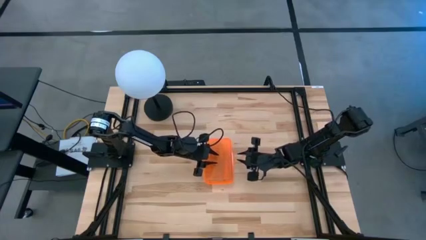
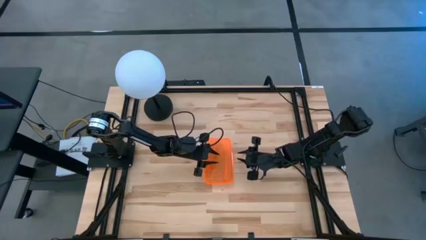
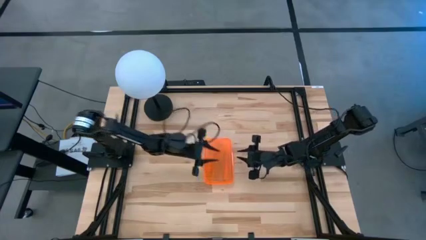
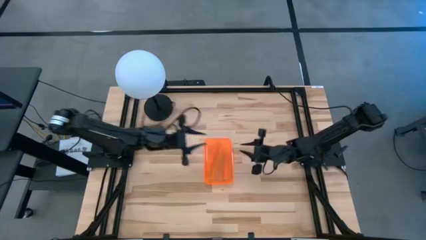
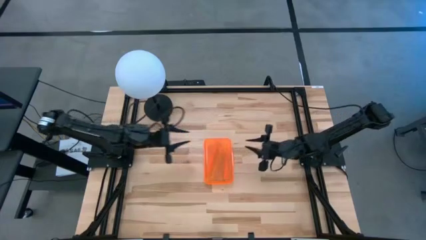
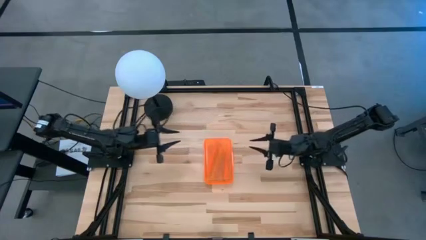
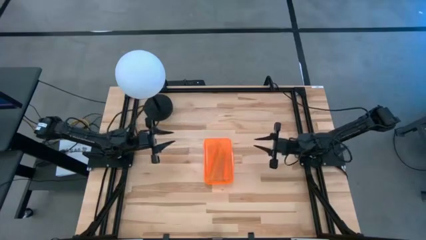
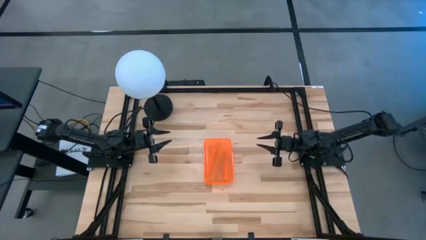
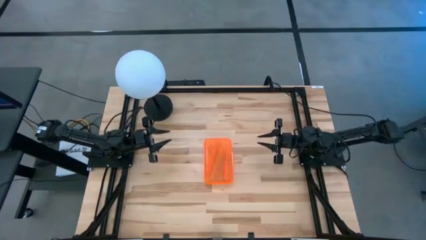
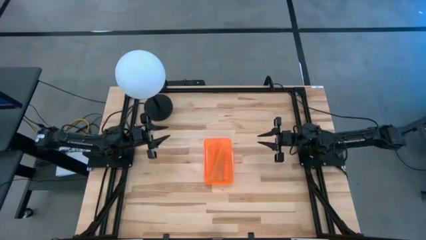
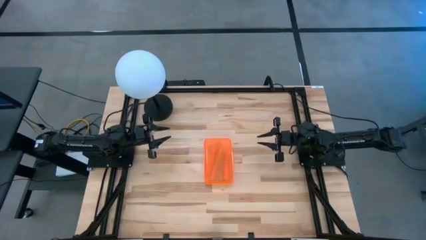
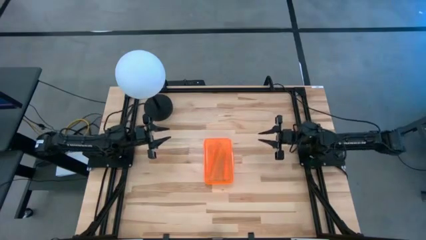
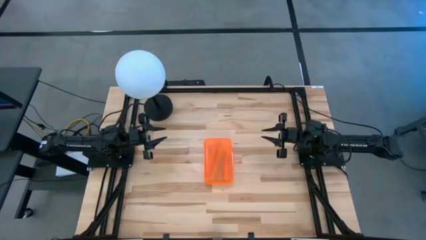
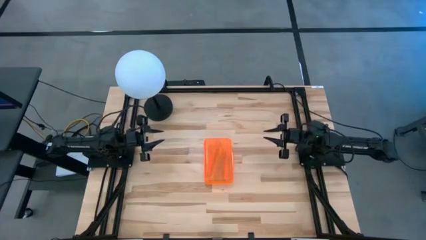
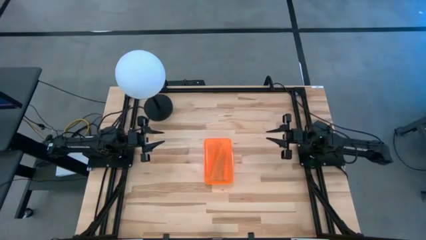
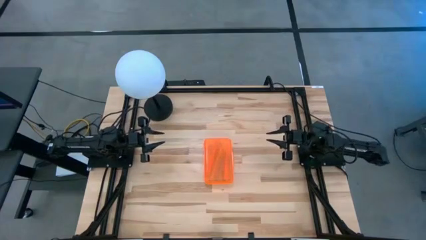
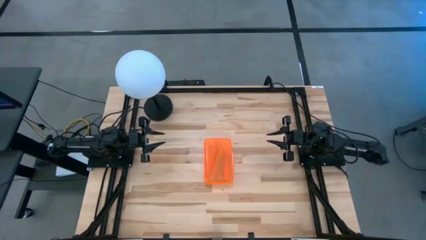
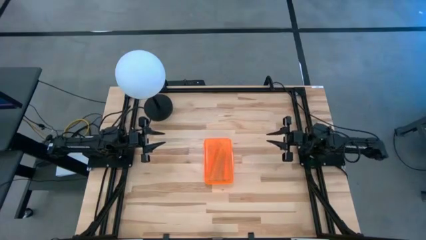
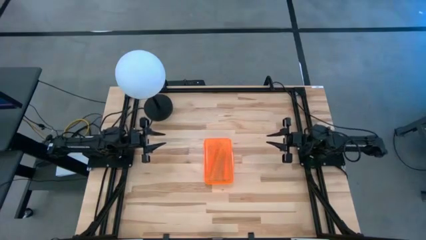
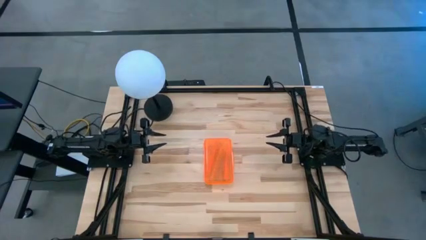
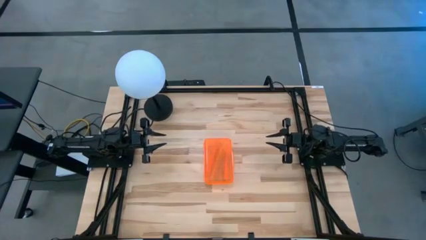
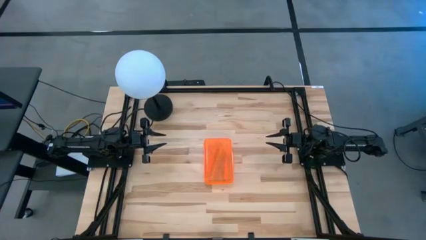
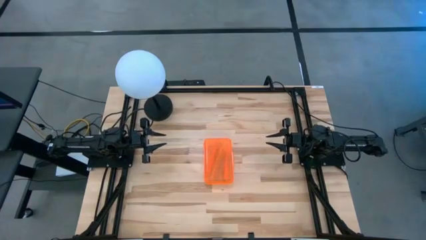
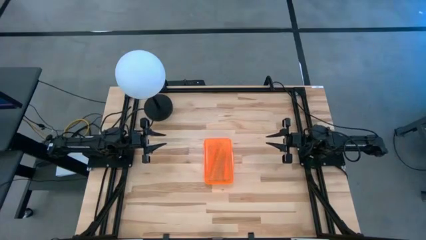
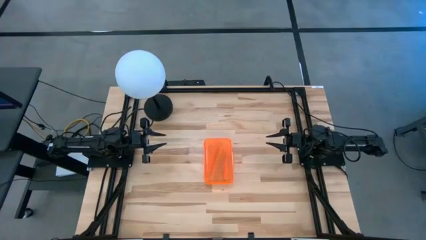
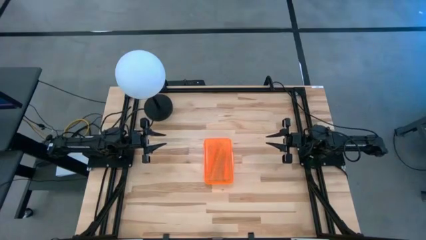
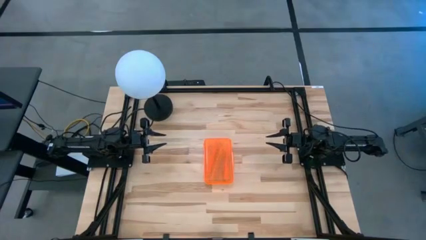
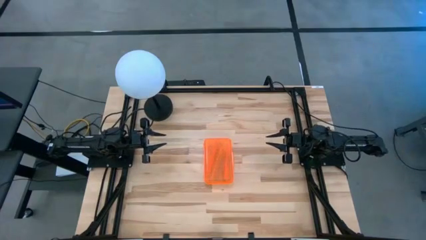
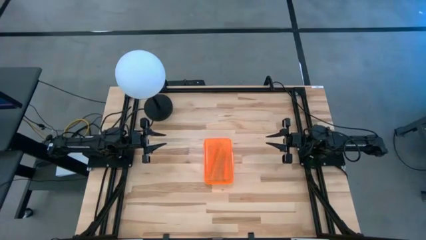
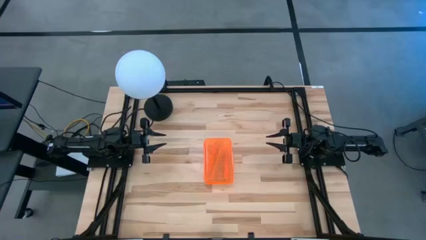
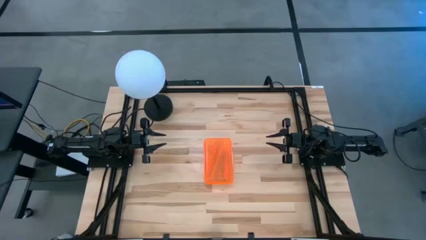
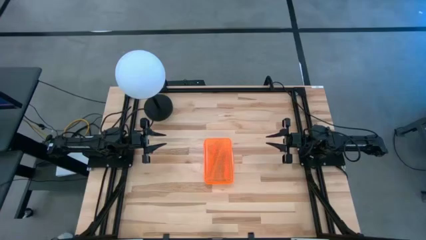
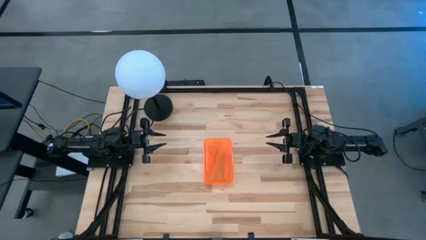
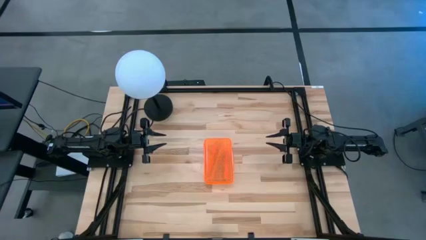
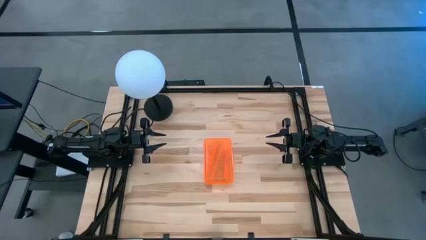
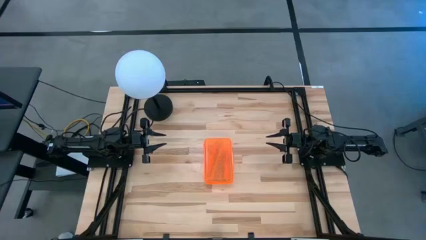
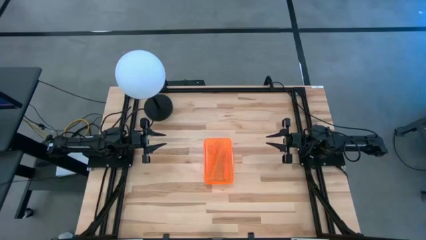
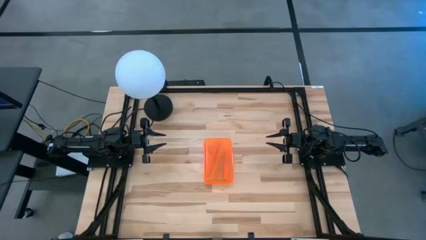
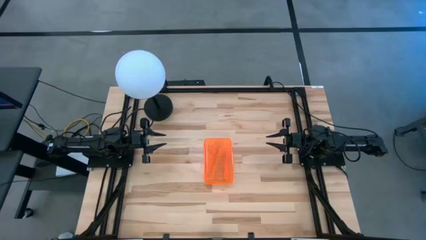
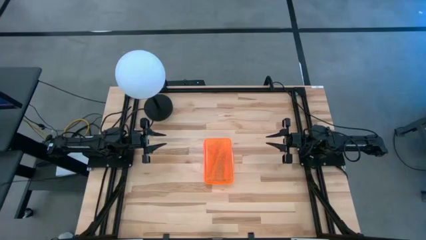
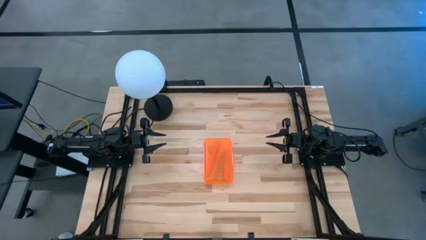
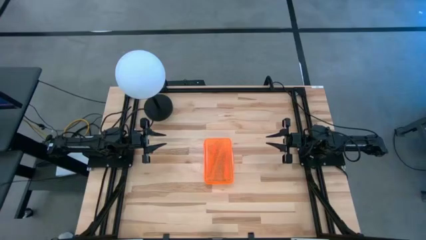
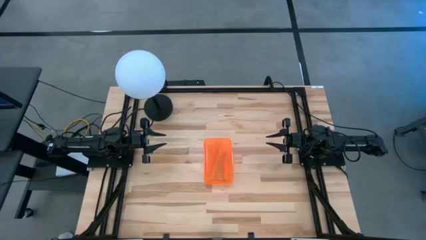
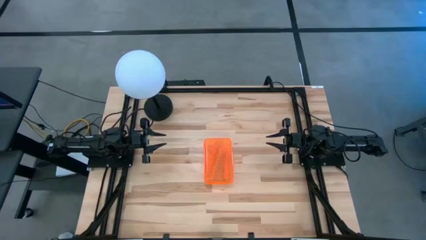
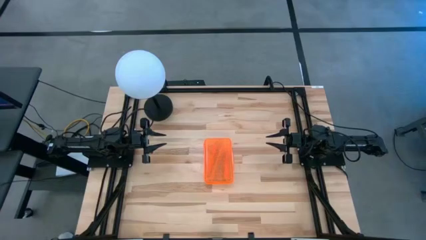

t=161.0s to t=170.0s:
Task: Pick & place school supplies into a supply box
Return to Home Position

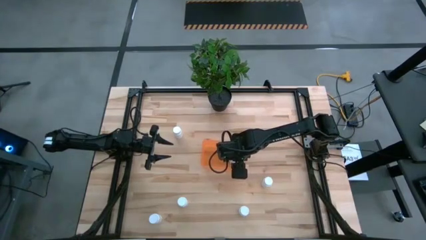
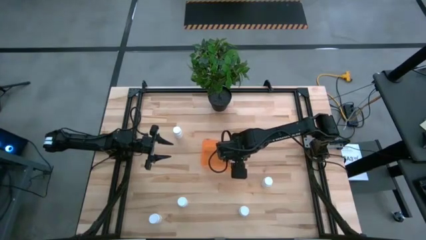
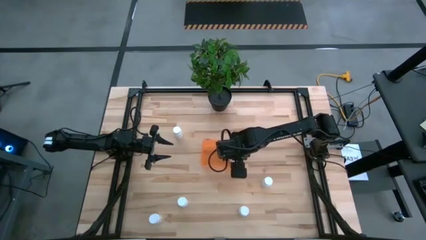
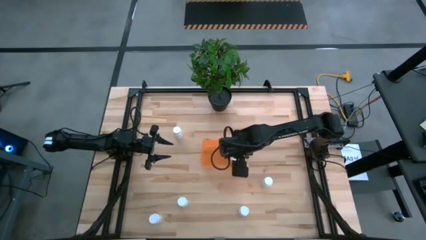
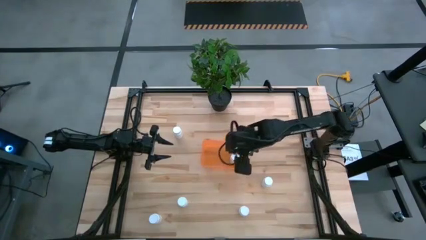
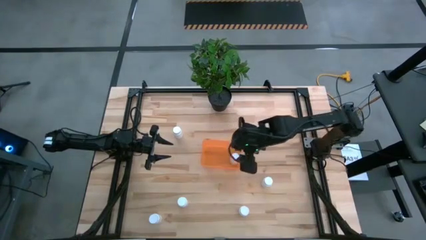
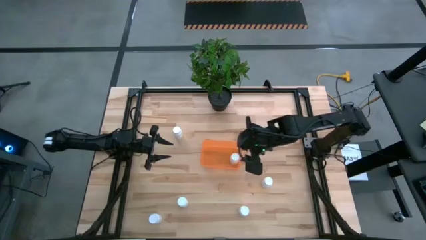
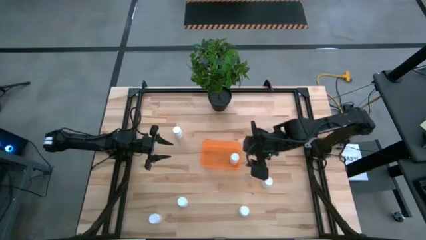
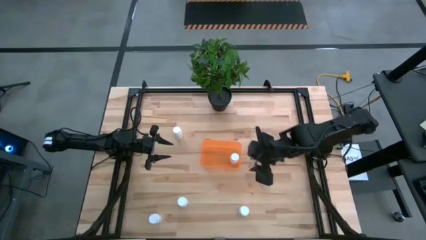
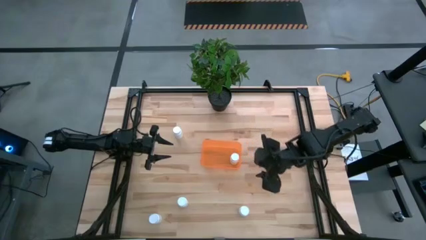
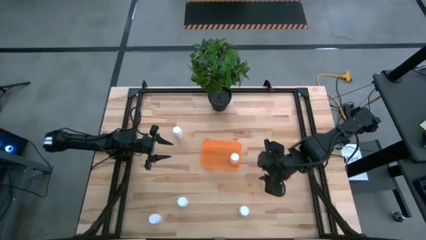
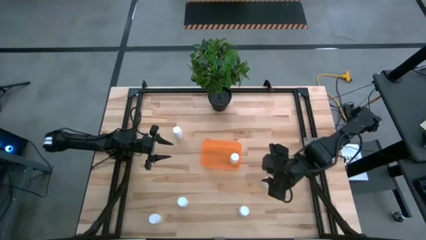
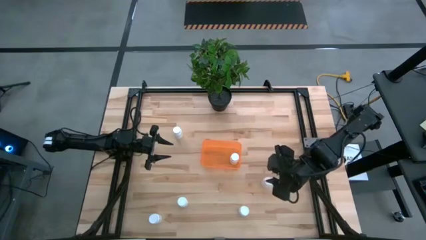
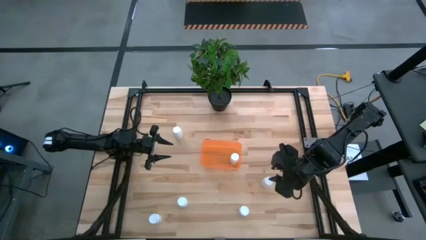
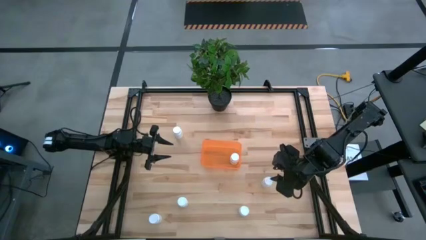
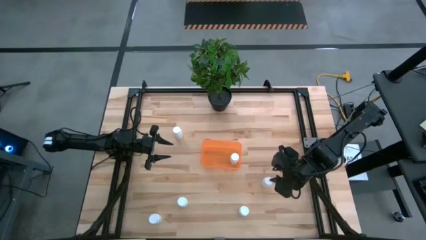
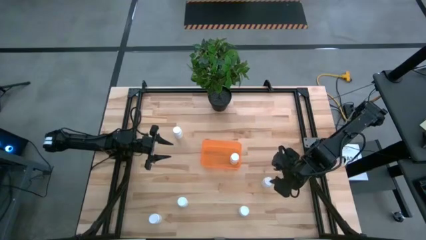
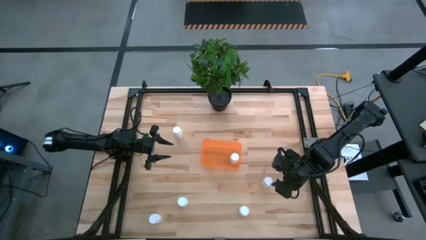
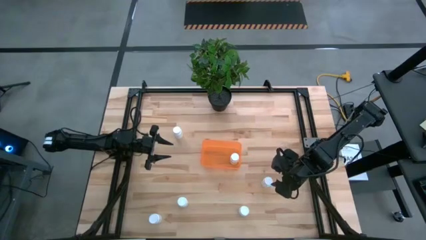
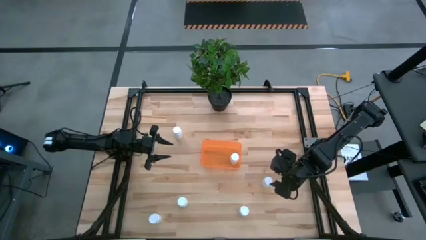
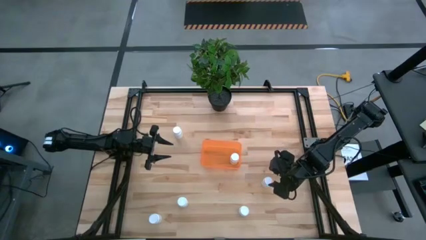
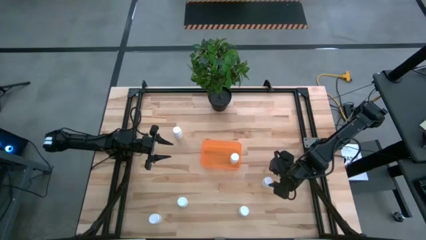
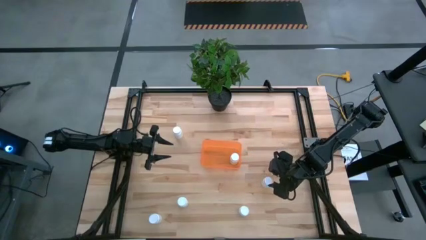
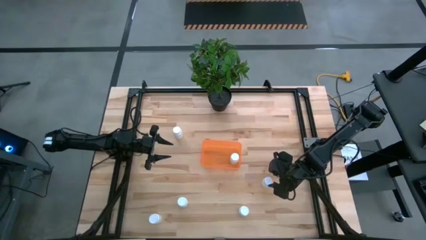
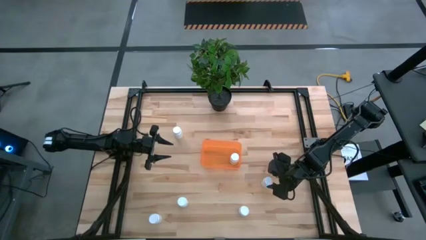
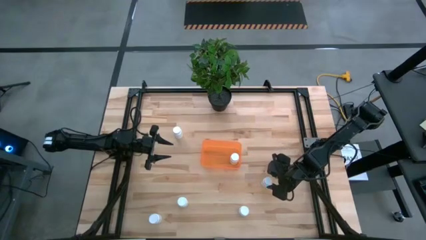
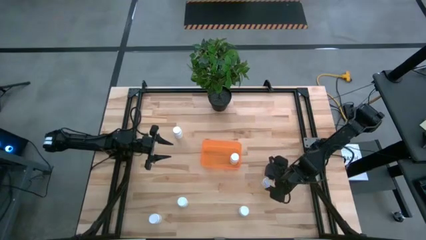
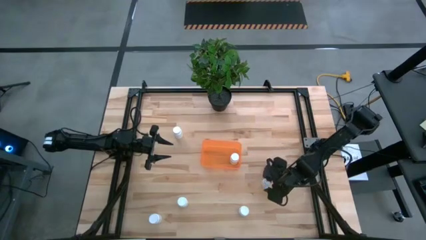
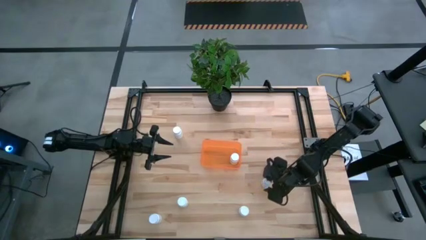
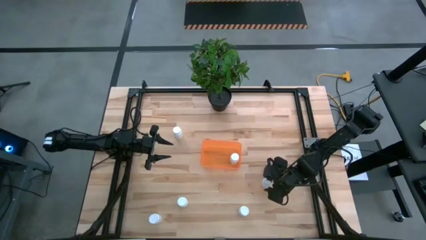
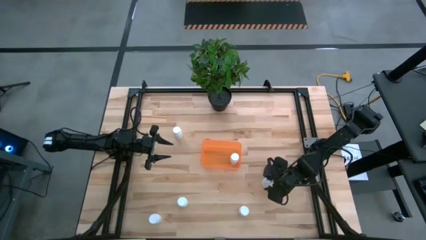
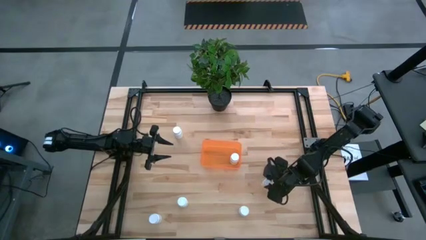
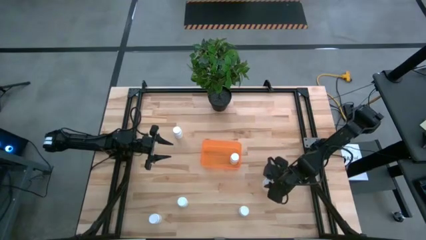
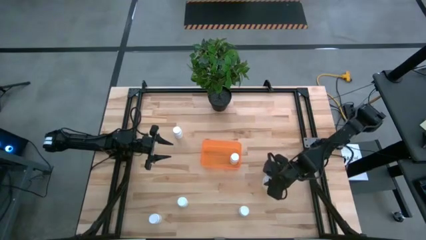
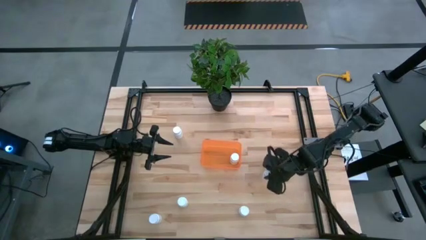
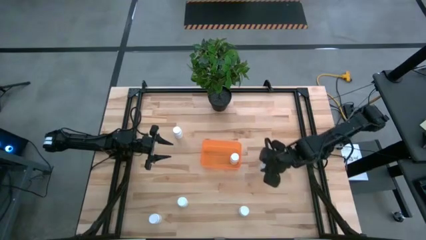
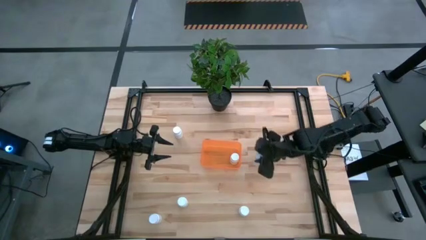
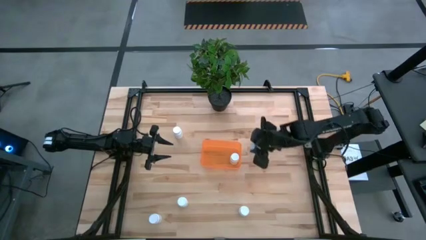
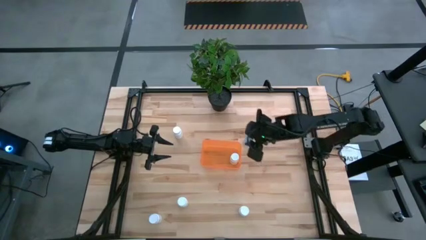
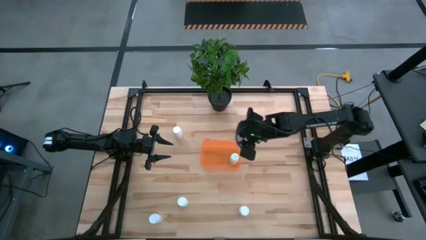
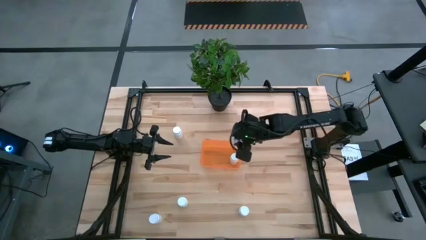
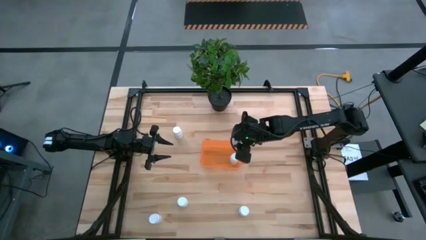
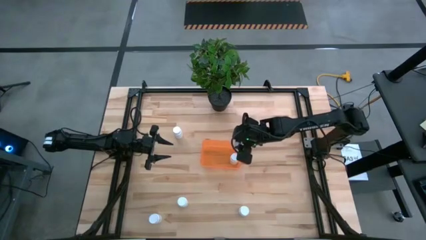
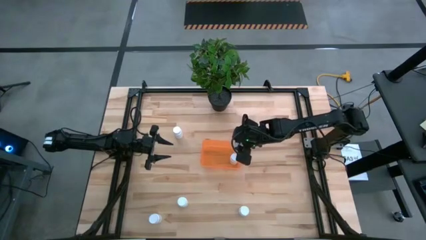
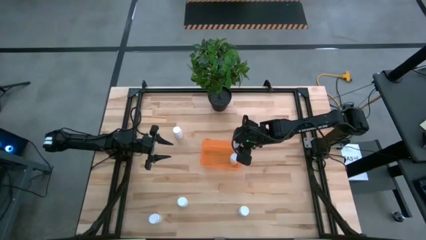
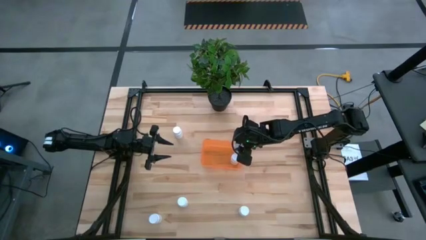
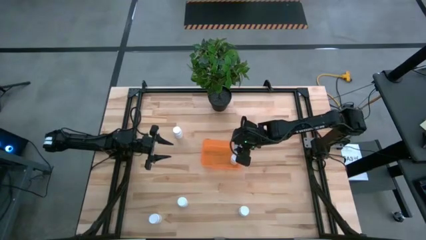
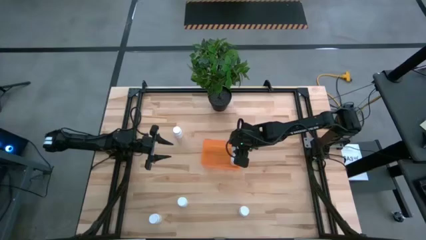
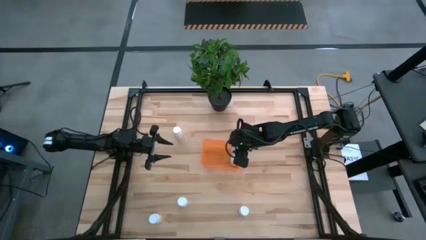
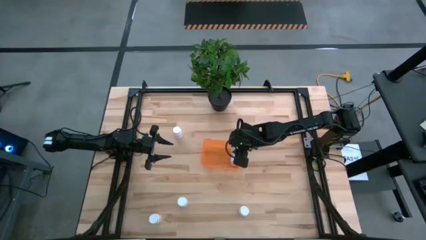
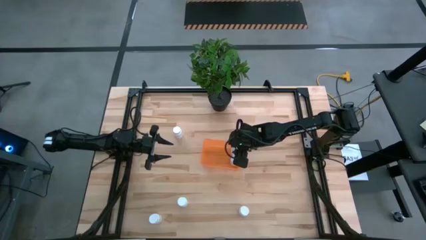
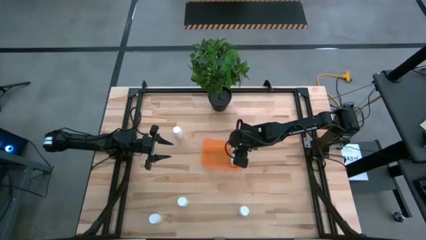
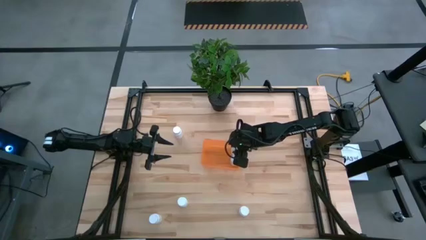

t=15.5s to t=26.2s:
Task: Pick and place pill bottles into a basket
Put the white pill bottle into the orange bin
